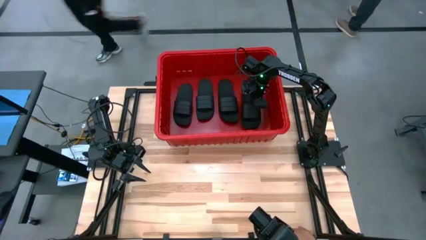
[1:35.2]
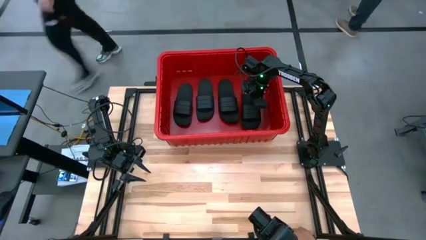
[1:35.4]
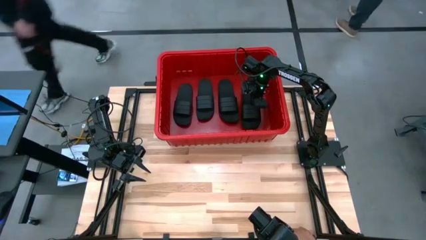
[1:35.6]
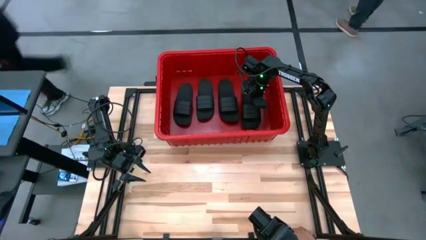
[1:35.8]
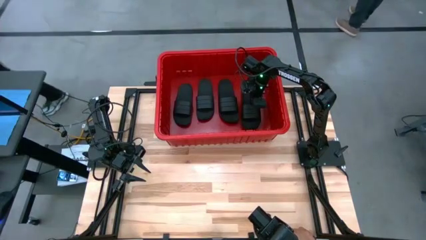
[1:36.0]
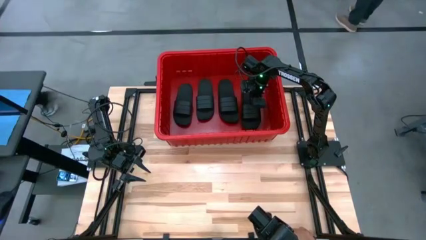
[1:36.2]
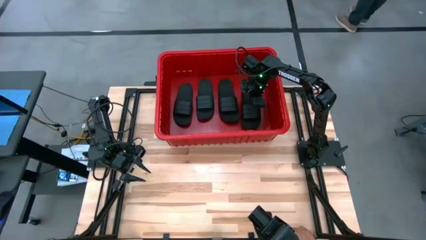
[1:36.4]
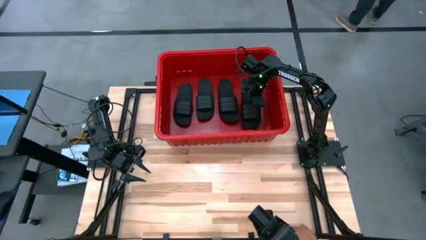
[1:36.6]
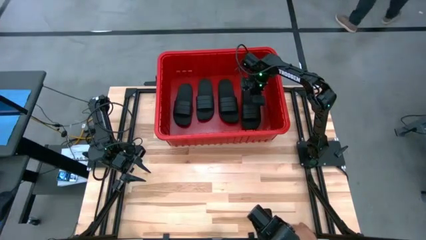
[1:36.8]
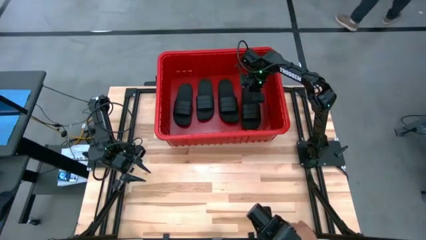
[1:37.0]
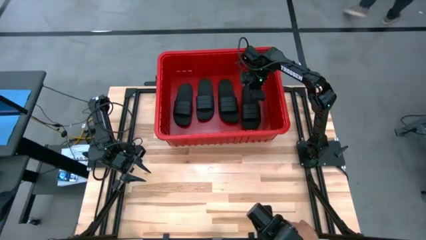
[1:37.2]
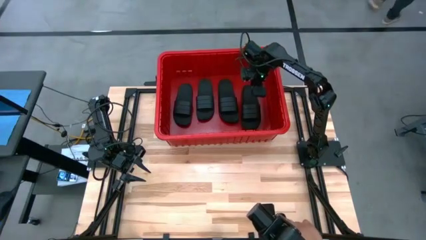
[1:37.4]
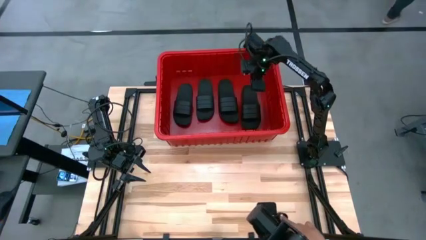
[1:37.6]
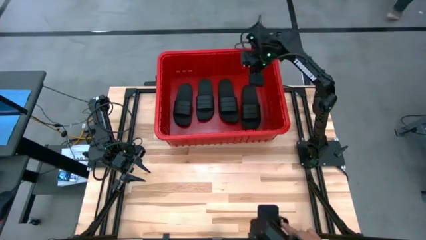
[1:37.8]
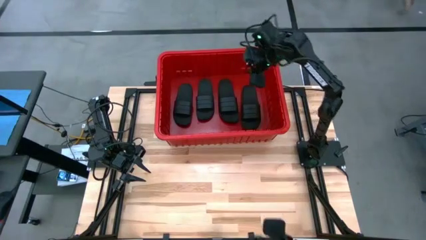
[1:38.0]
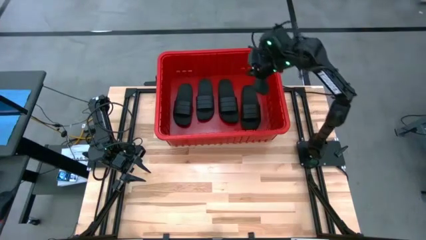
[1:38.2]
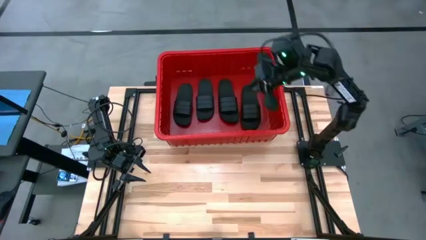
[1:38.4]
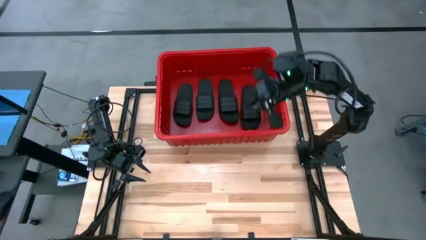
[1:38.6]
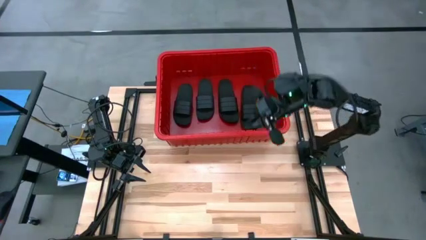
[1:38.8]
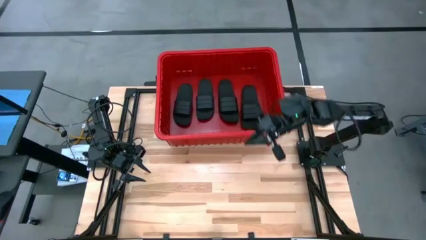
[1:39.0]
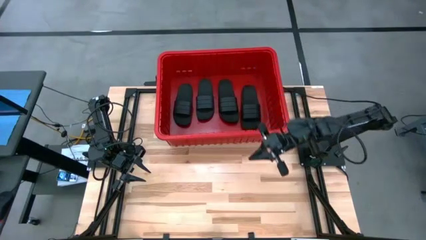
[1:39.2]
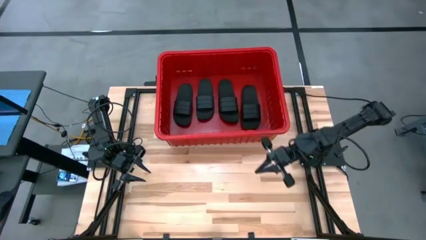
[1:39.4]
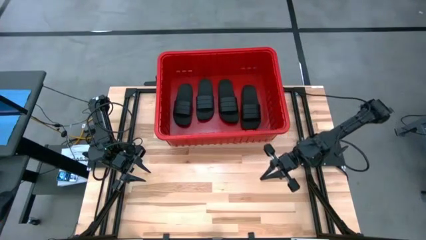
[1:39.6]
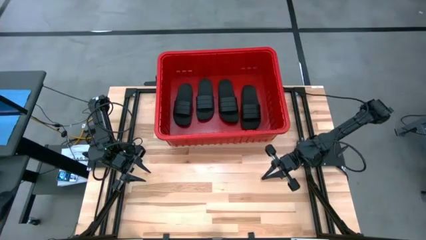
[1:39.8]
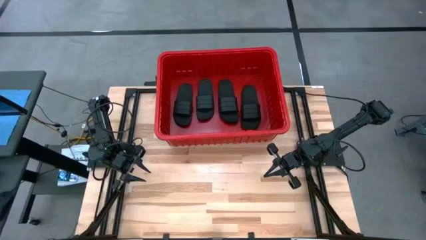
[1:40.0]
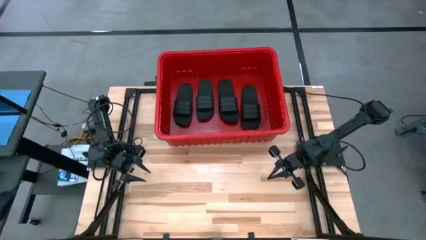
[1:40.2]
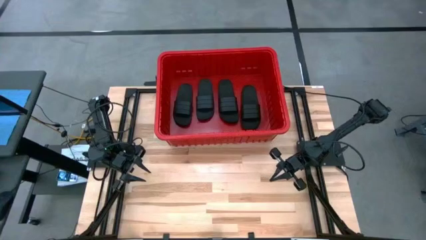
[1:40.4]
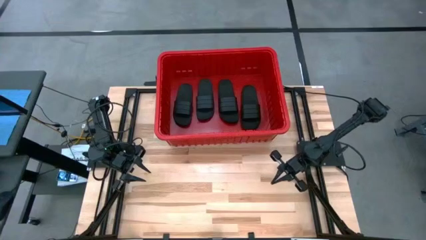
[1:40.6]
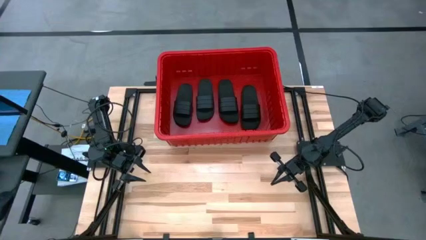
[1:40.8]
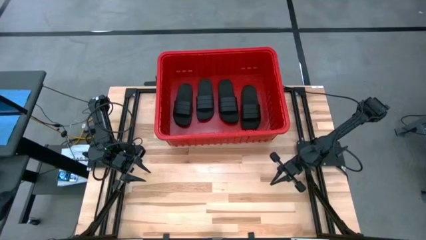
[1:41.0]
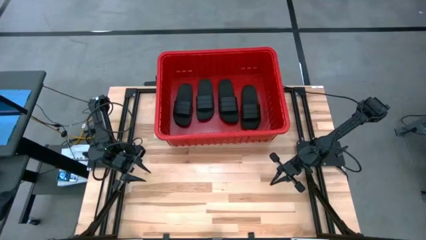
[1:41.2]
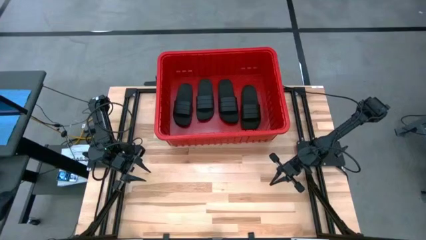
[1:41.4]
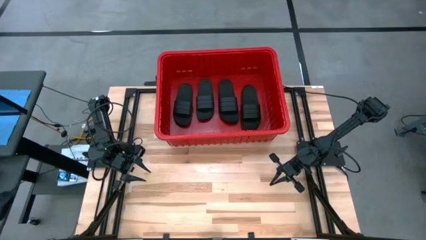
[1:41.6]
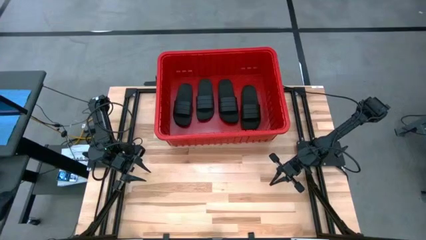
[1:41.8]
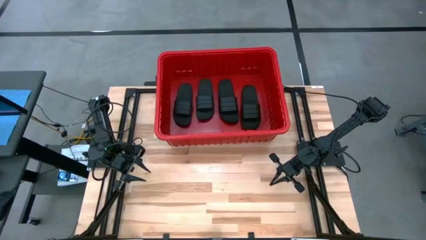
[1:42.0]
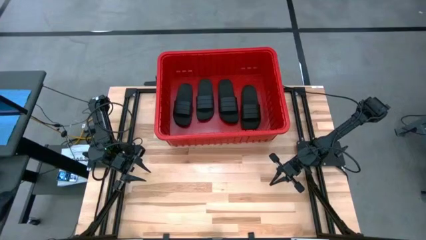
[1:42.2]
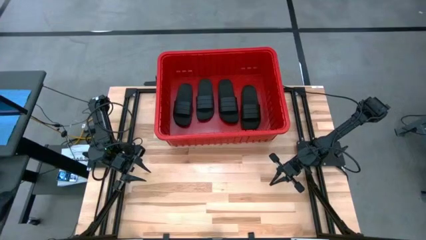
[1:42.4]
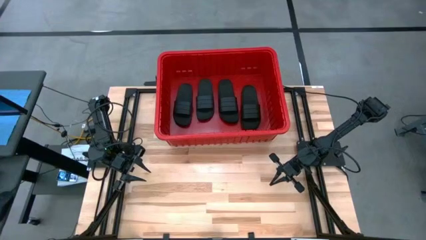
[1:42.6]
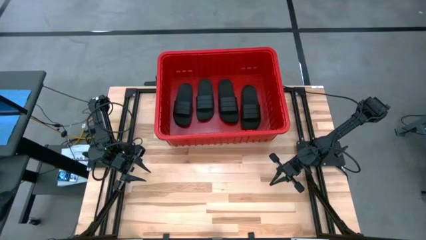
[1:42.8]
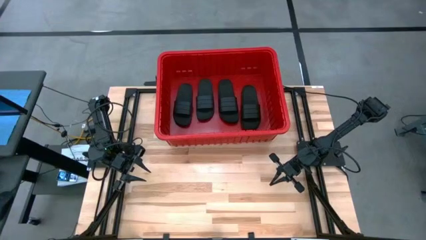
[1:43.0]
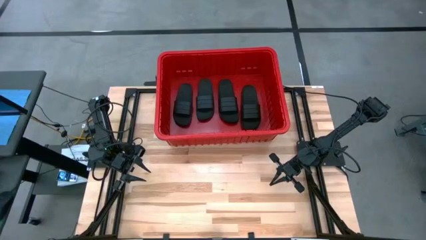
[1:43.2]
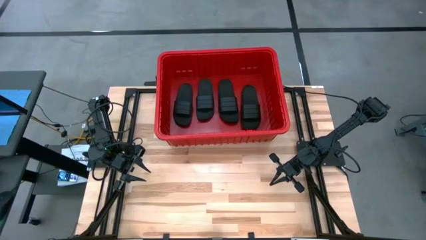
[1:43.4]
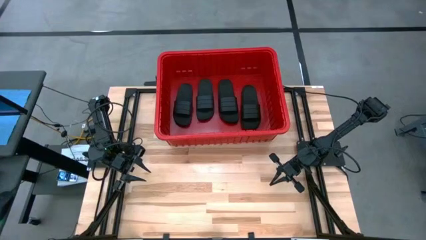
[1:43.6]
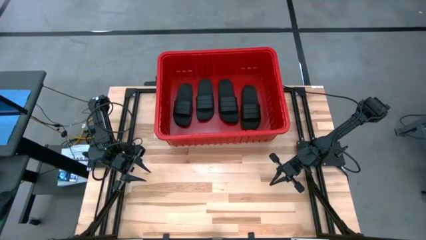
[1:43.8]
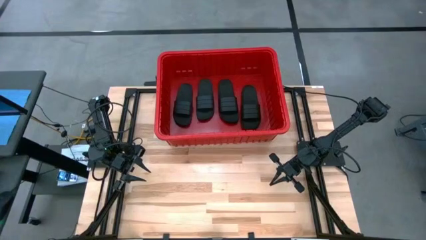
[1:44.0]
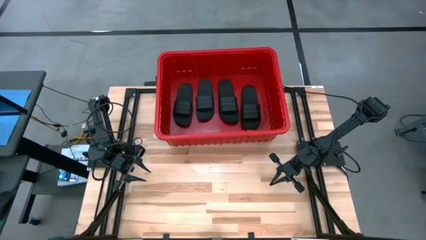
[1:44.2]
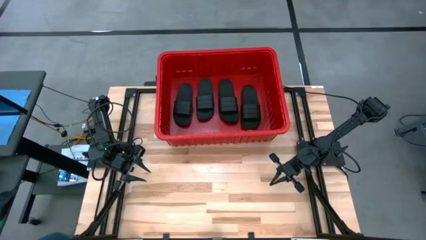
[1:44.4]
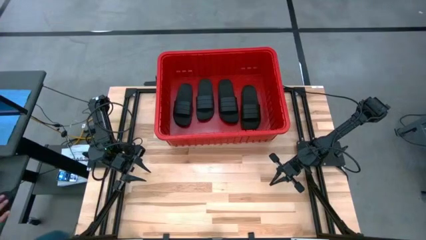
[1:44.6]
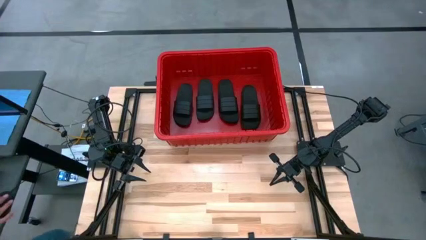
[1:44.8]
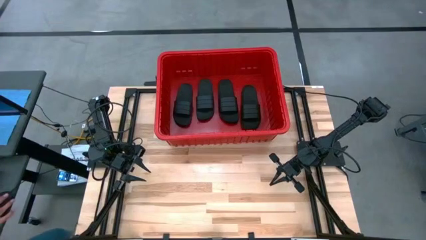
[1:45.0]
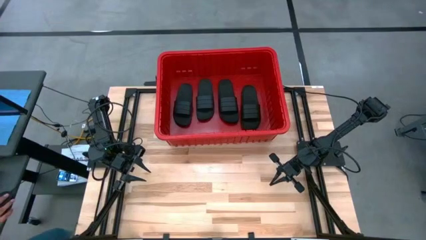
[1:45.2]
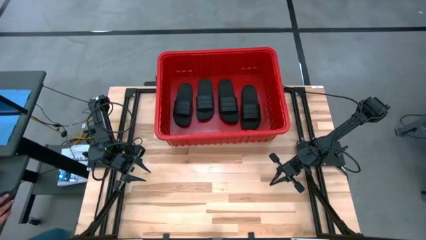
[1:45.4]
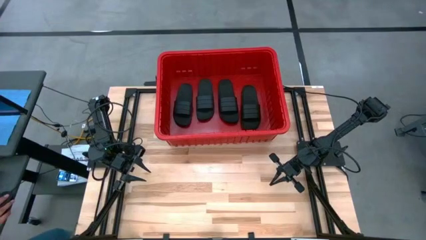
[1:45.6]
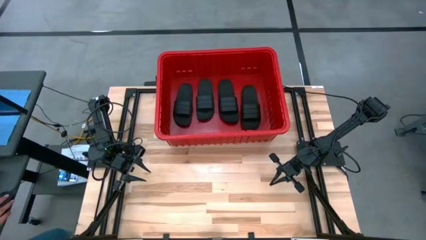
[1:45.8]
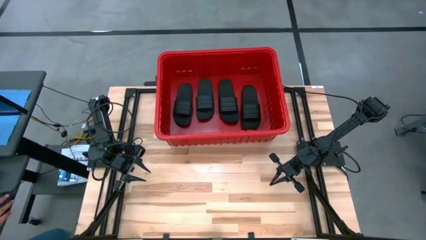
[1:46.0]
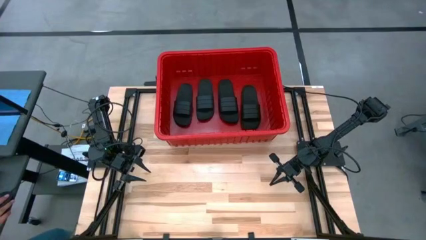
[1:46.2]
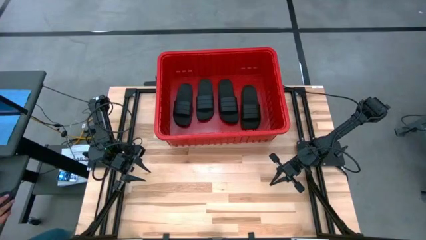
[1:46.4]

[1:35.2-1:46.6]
Task: Pick and place slides into bin
Return to Home Position

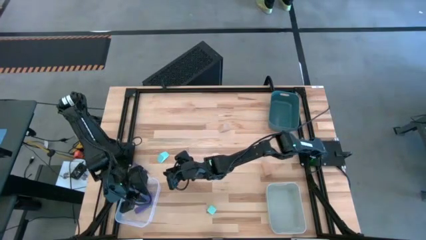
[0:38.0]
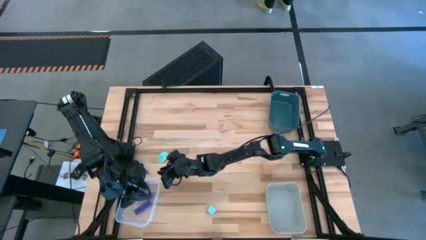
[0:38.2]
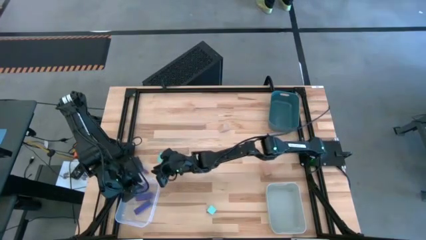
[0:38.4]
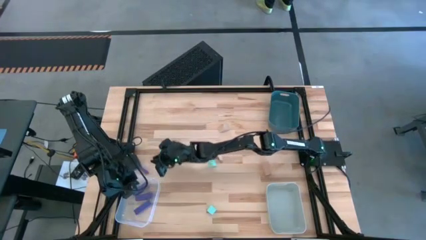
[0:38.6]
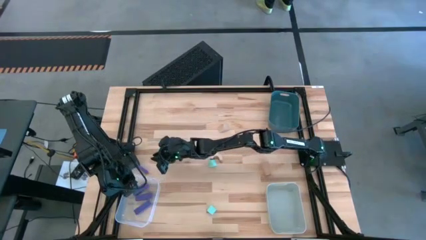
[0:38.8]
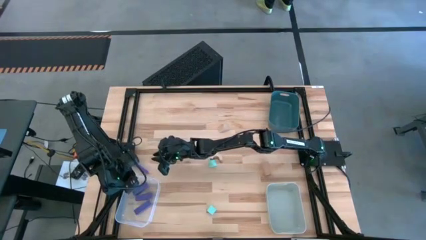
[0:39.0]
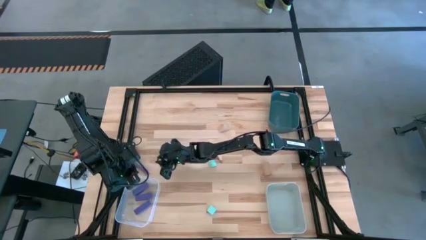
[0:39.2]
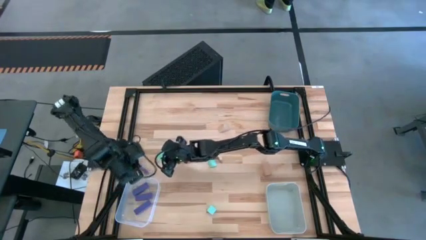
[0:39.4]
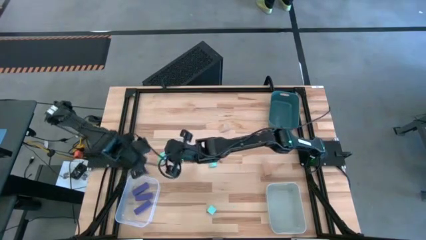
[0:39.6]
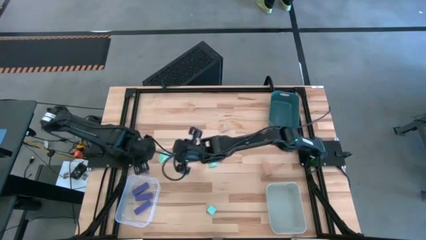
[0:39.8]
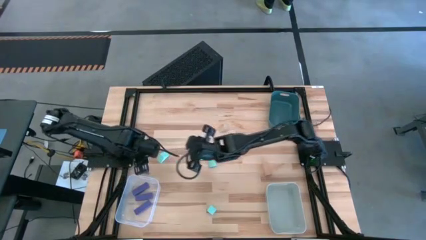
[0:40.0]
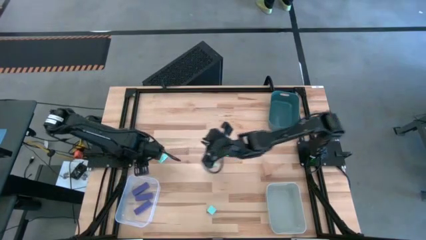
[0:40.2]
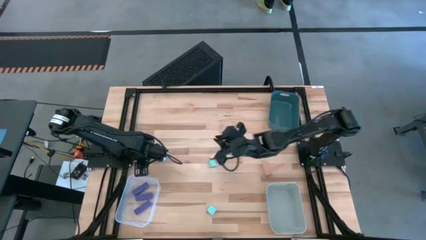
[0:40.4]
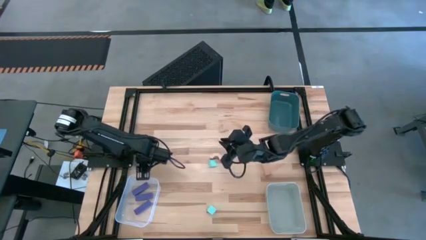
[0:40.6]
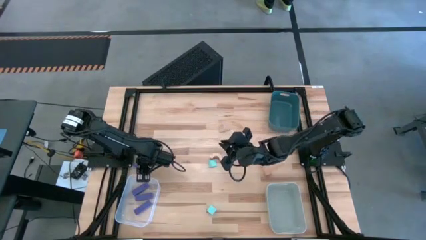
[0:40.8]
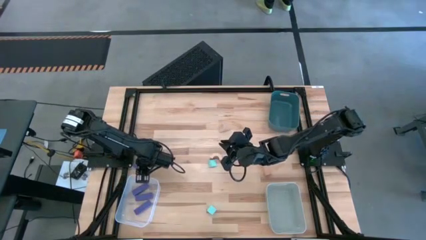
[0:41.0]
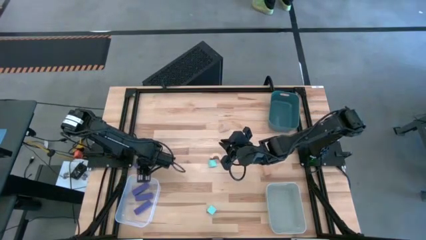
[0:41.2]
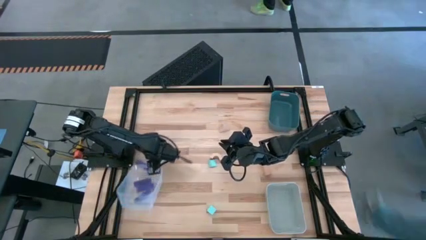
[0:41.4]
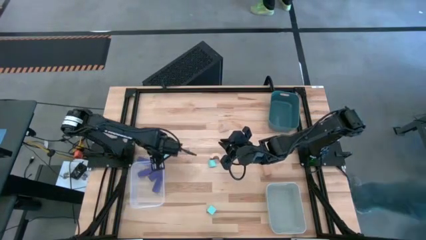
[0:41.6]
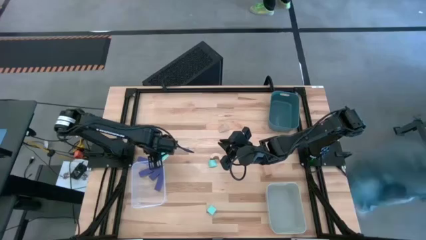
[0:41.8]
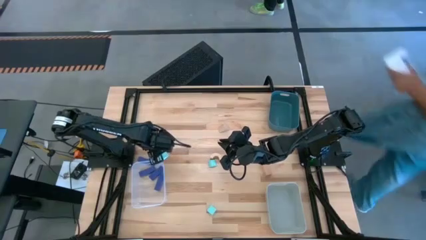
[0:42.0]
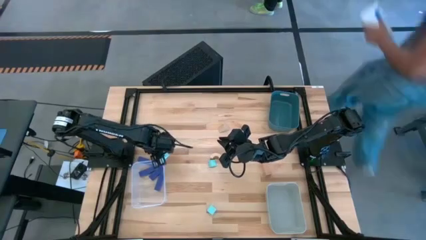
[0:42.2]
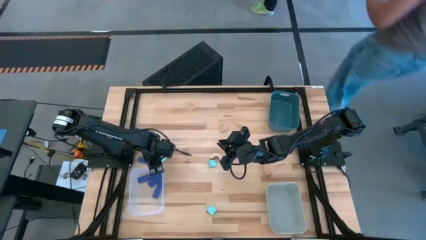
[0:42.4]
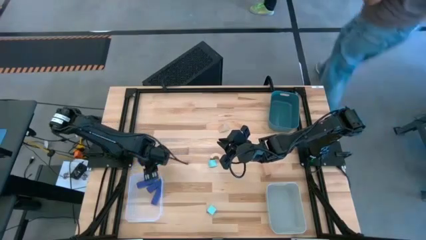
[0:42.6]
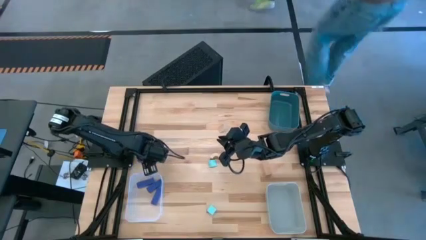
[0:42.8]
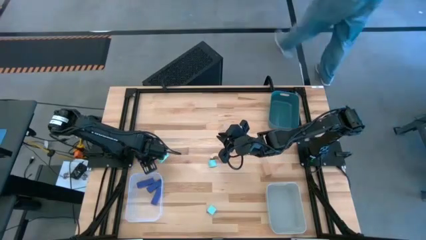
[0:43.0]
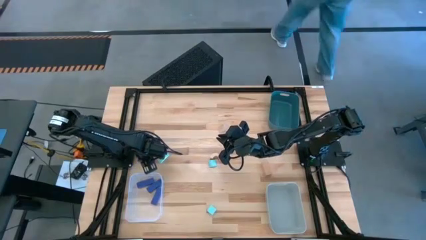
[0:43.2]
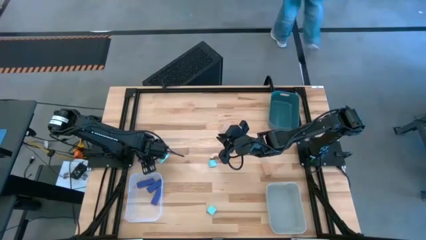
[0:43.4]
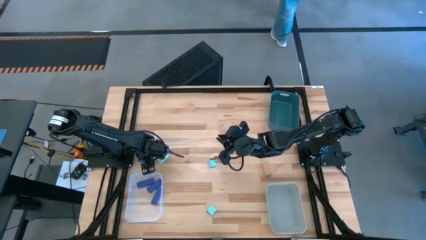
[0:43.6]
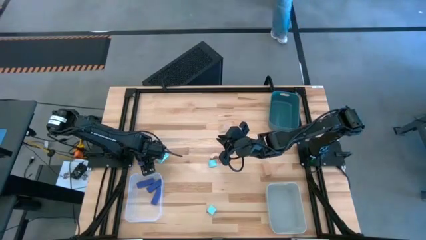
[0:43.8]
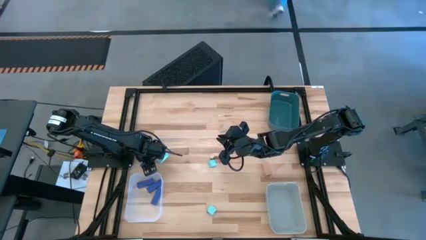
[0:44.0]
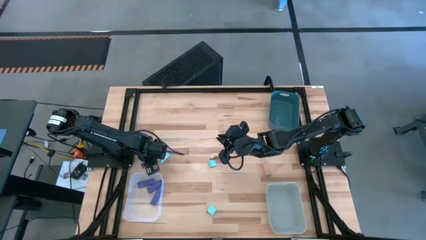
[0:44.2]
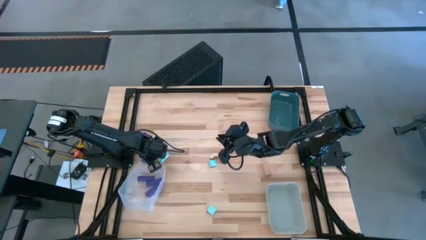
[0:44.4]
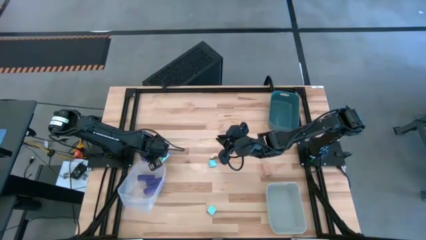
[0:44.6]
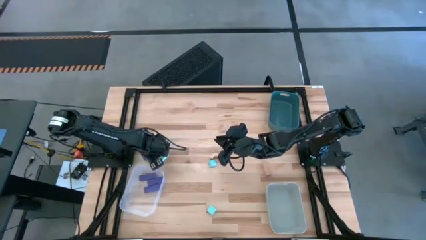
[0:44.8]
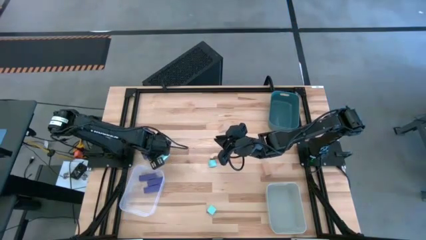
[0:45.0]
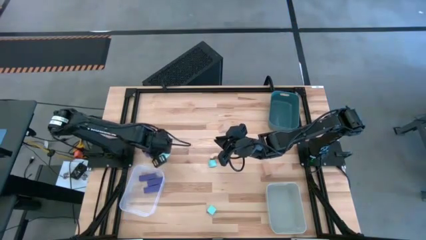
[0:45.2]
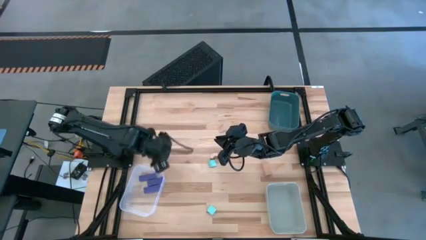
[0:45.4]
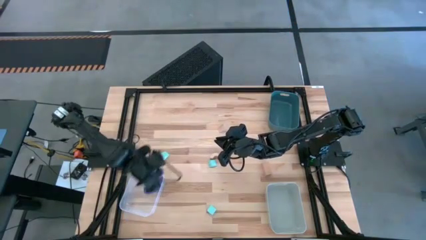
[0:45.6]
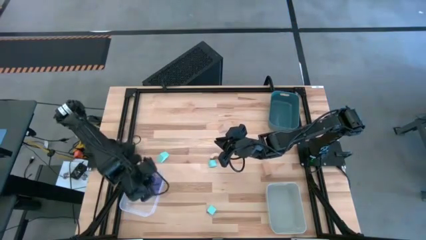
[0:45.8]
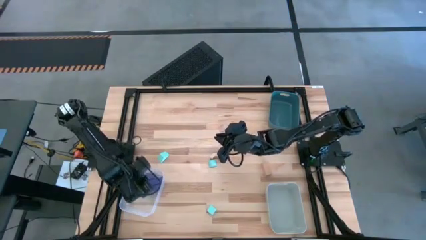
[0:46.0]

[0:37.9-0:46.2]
Task: Sort & place blocks by color
Put the purple block into the transparent bin
